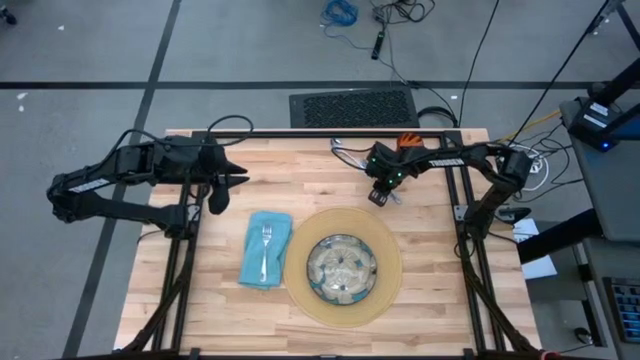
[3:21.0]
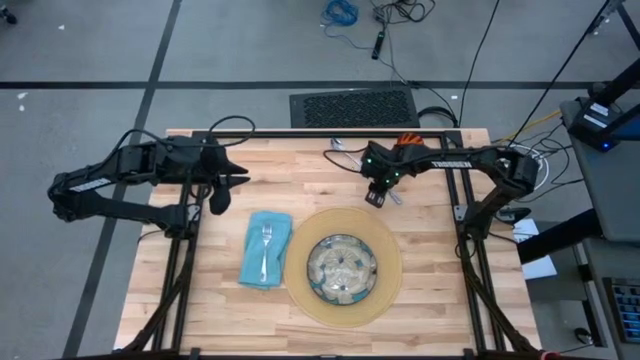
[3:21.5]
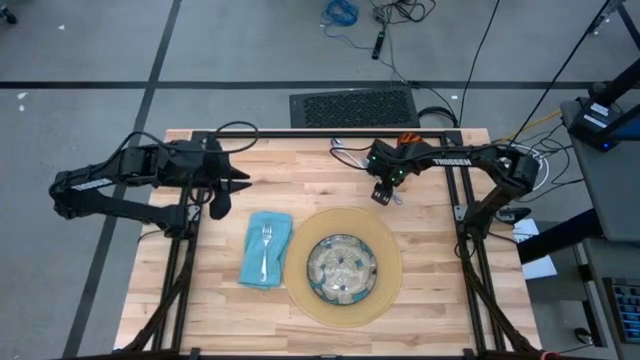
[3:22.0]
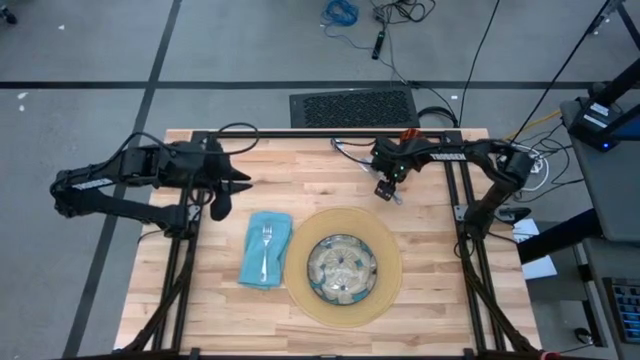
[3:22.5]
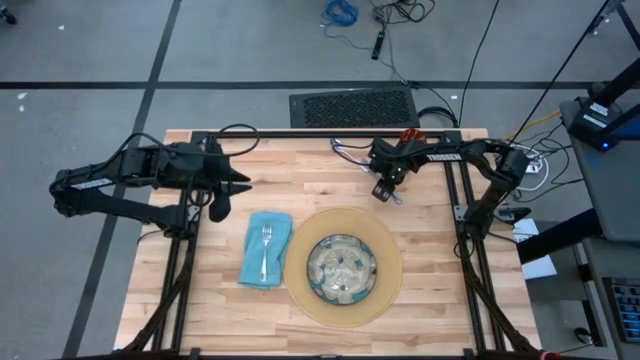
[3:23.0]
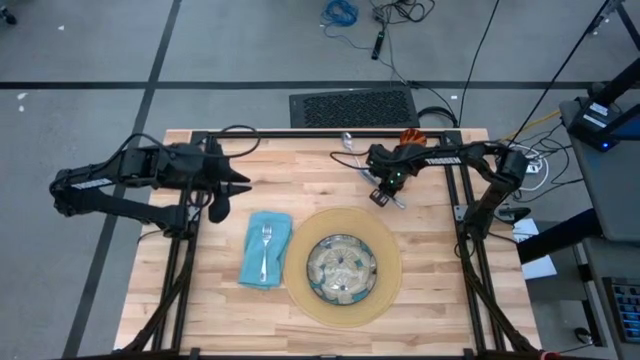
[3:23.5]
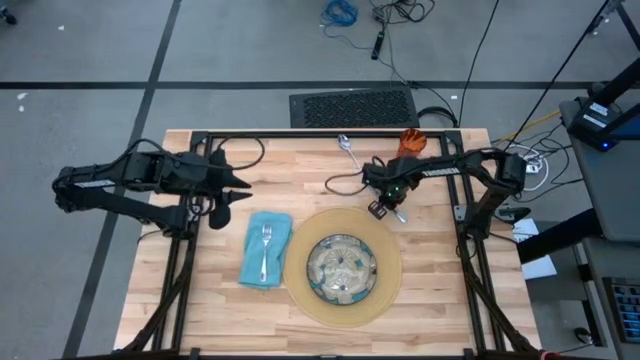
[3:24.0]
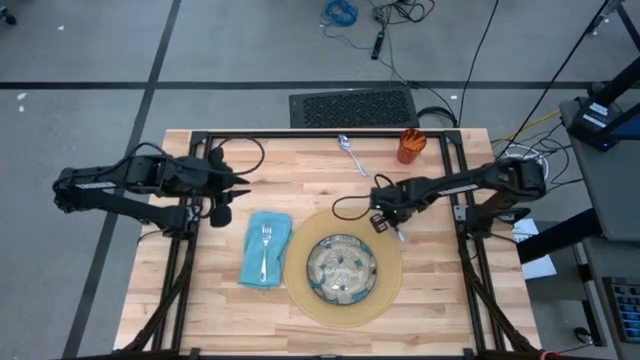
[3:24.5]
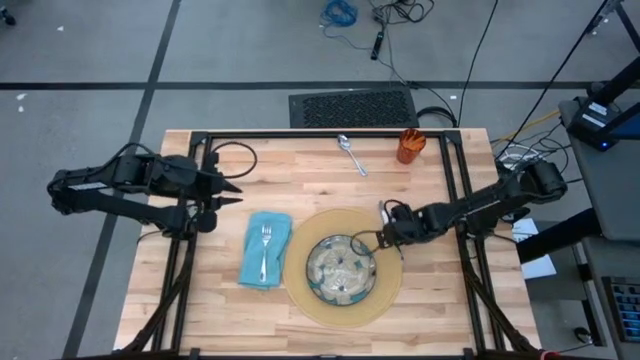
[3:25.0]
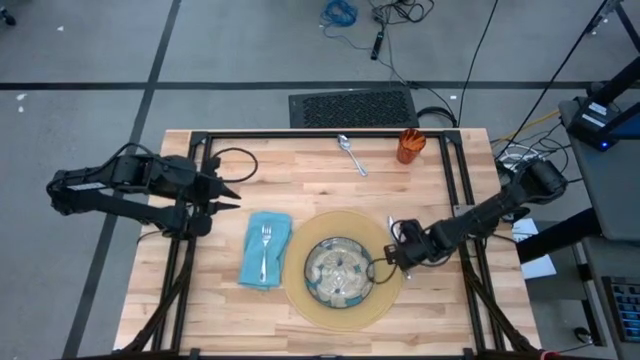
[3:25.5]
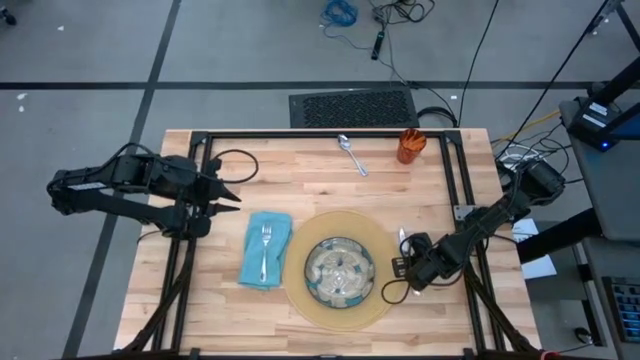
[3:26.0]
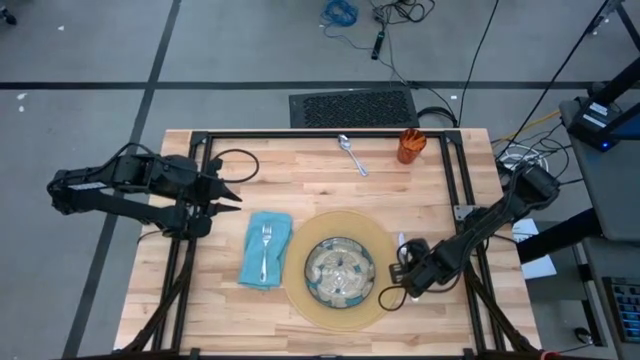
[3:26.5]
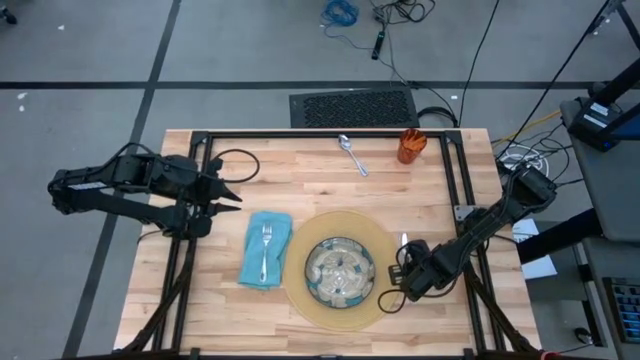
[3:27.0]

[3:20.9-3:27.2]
Task: Set table place
Put the silver knife to the right of the brown mat

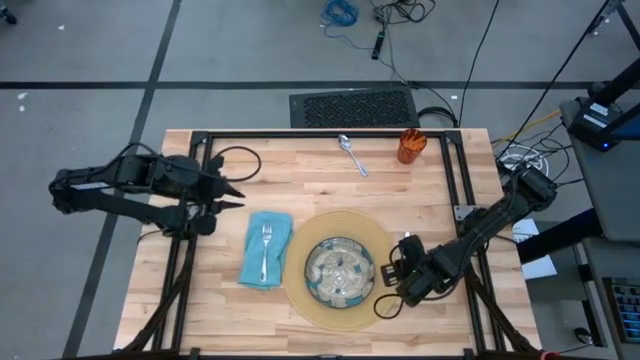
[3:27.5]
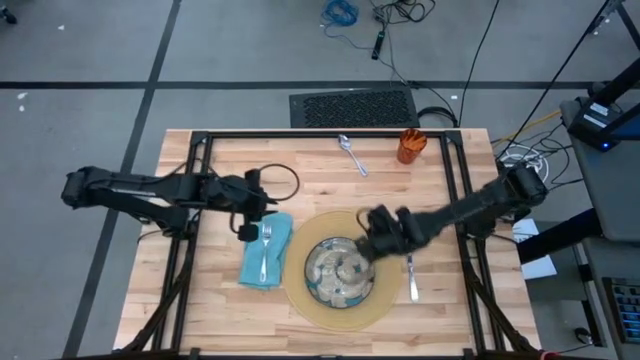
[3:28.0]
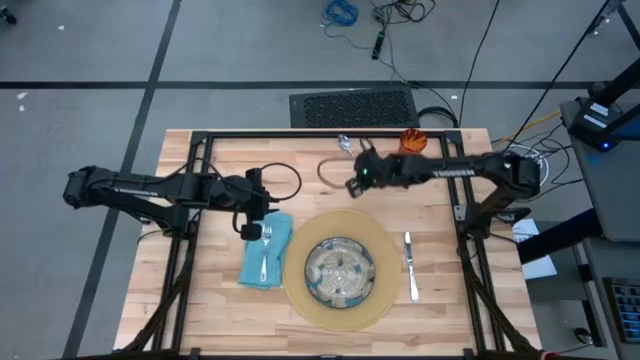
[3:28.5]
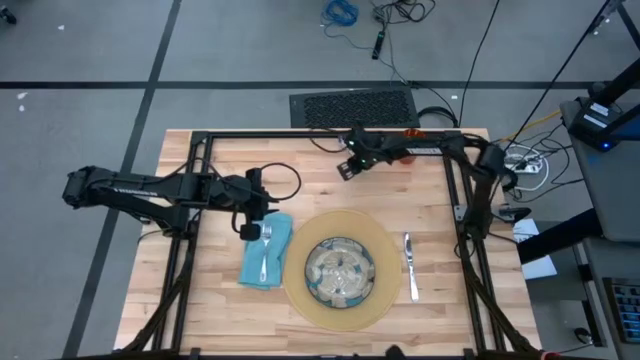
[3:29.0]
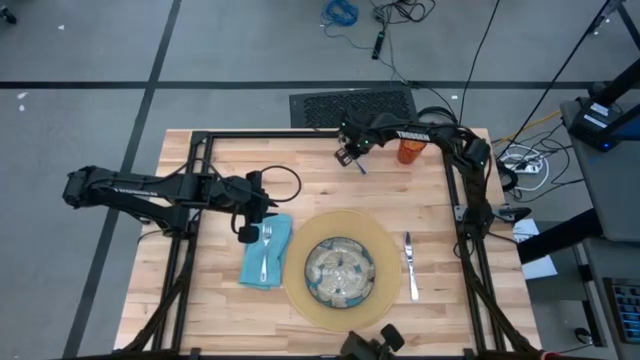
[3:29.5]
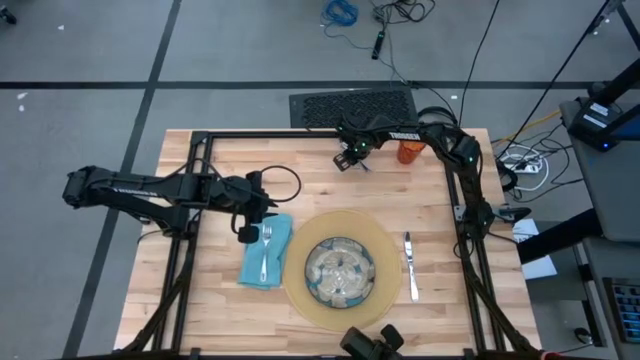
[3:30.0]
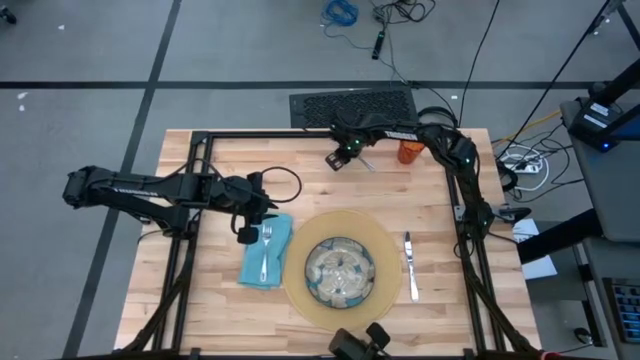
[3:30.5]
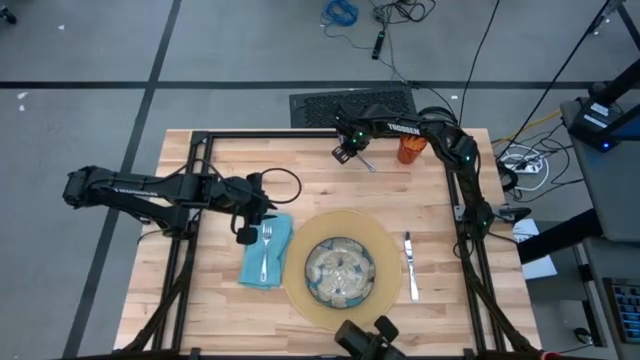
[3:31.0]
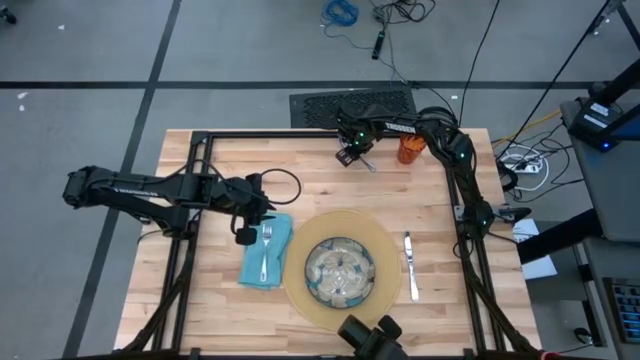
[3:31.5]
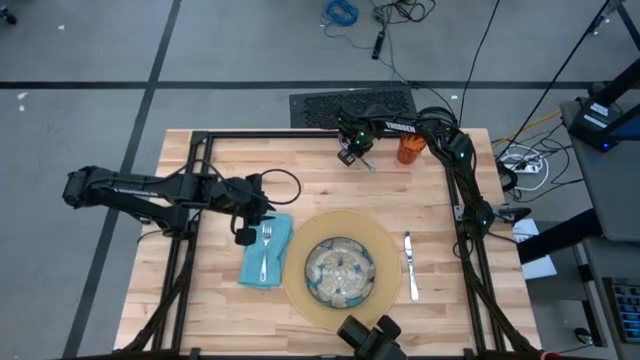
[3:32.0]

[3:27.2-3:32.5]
Put the silver spoon beside the silver knife

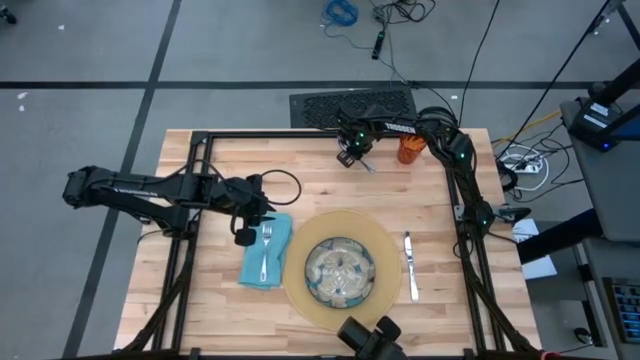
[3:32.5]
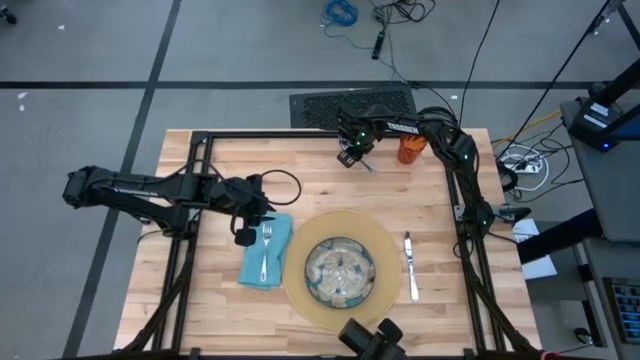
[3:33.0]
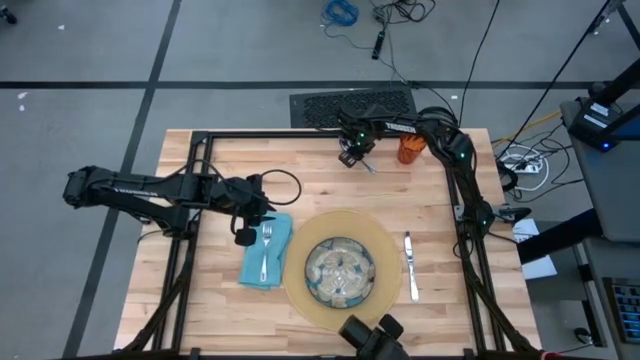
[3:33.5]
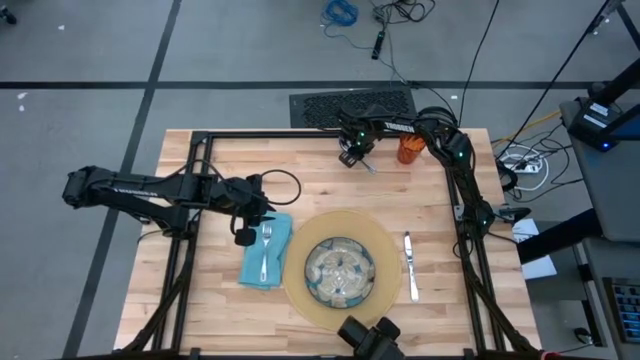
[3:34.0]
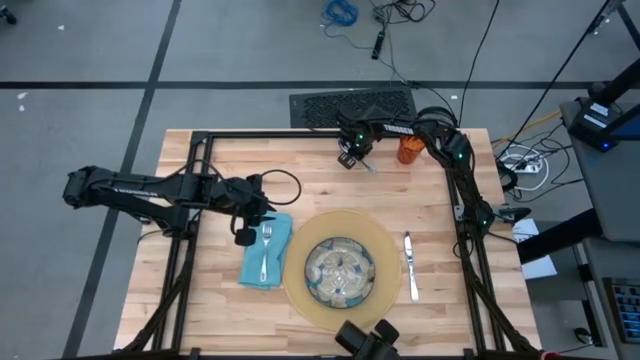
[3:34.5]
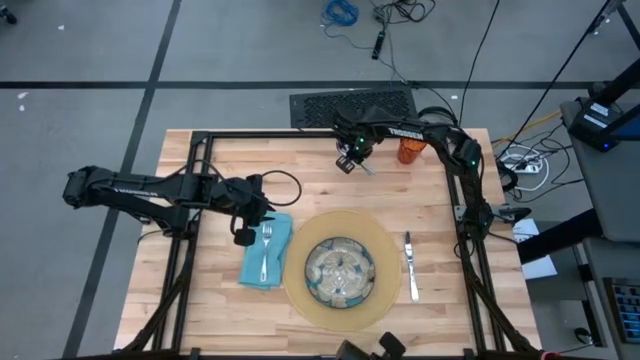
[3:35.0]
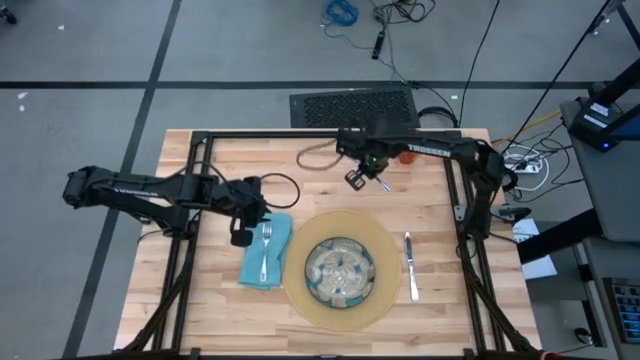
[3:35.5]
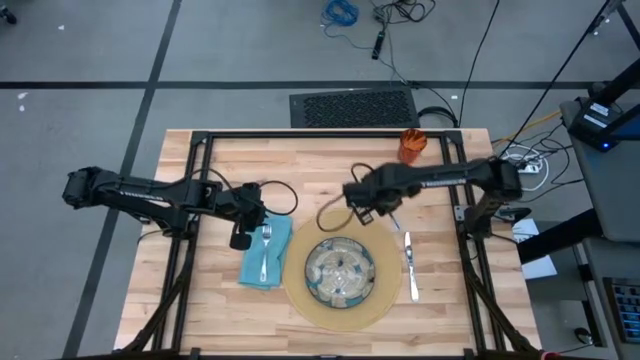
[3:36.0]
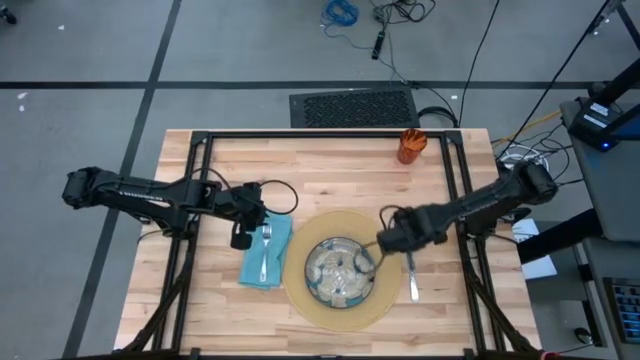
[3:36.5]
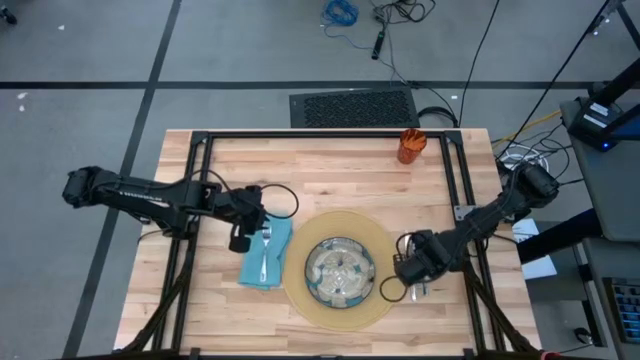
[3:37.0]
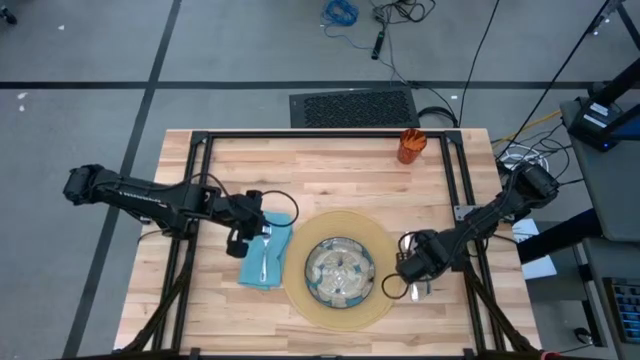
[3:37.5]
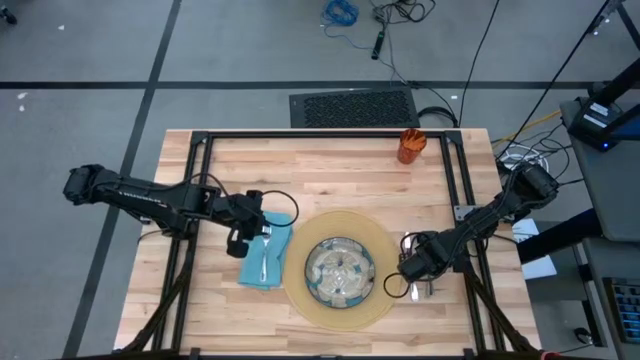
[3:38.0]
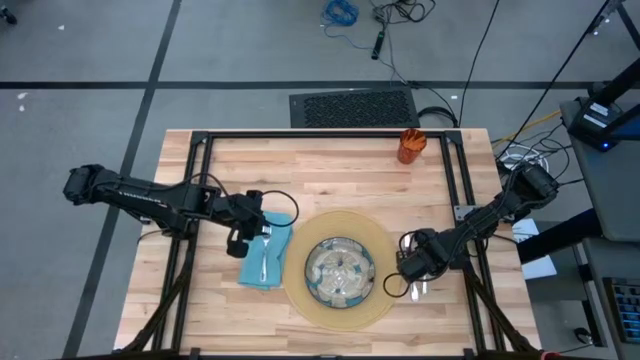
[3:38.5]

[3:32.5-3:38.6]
Put the silver spoon beside the silver knife

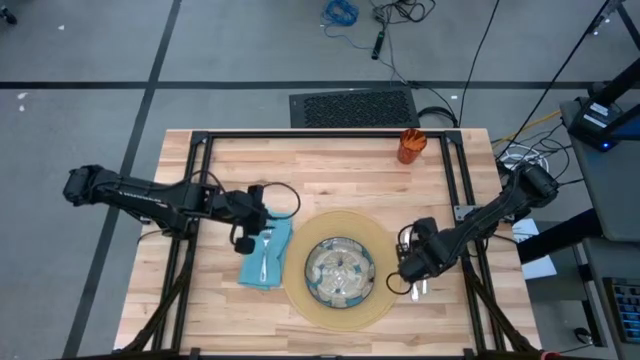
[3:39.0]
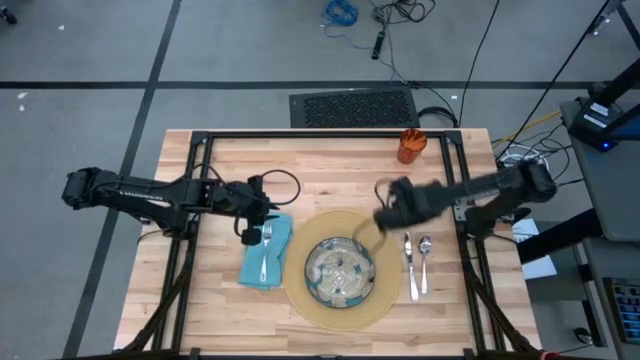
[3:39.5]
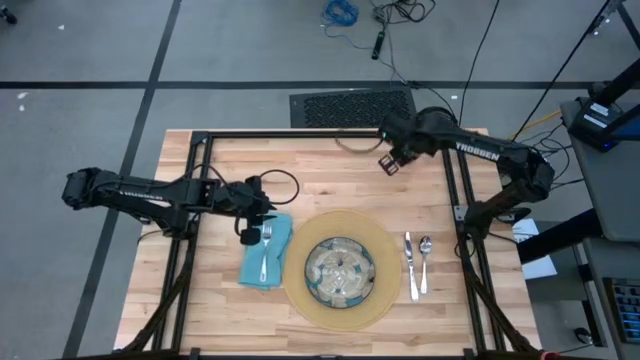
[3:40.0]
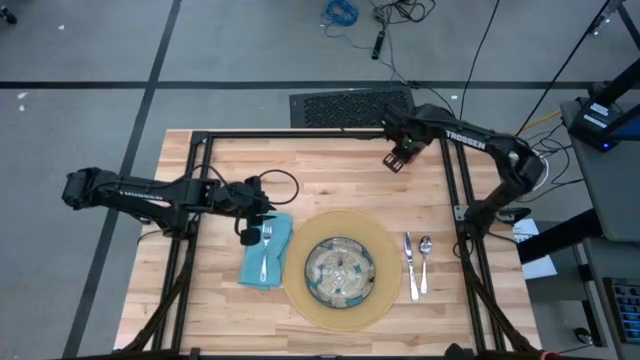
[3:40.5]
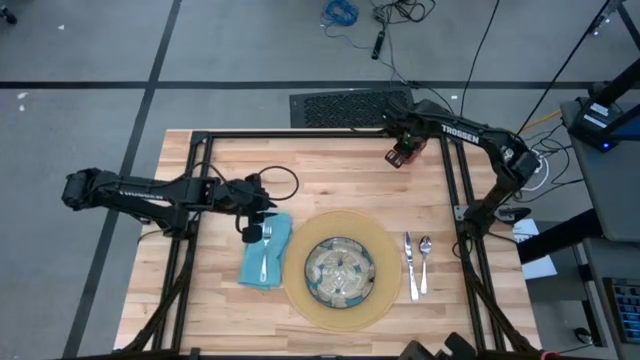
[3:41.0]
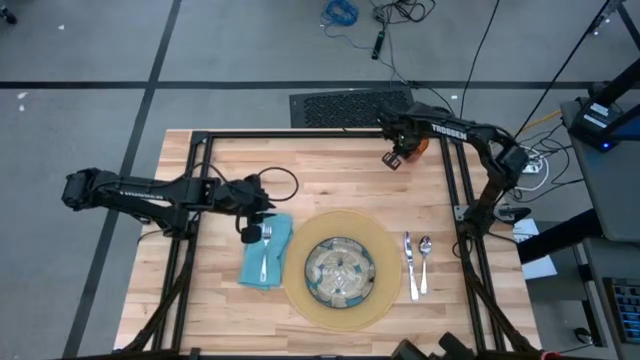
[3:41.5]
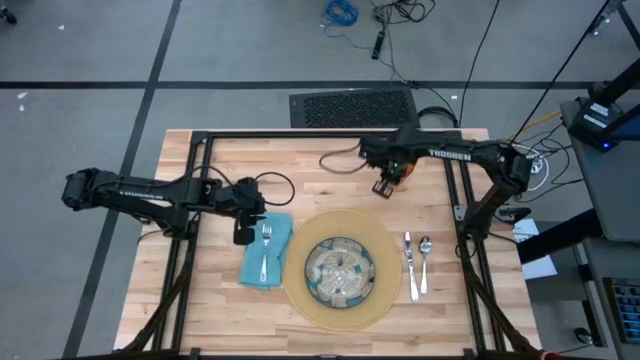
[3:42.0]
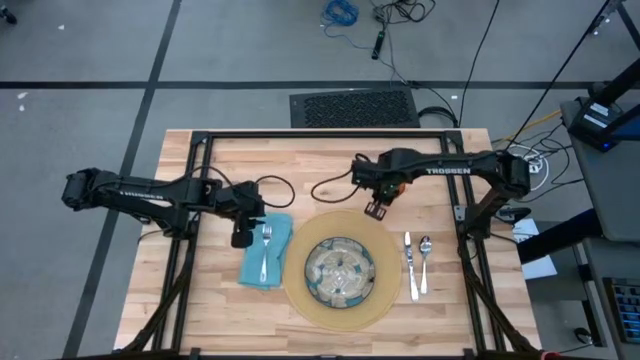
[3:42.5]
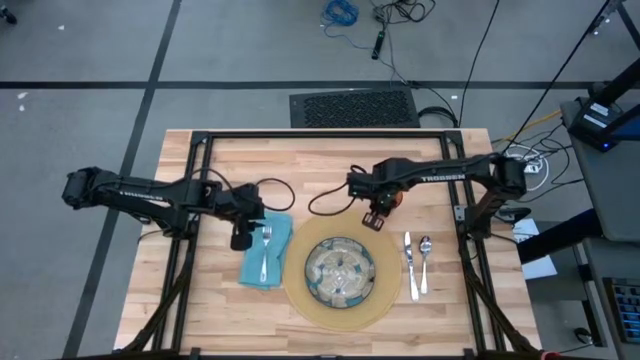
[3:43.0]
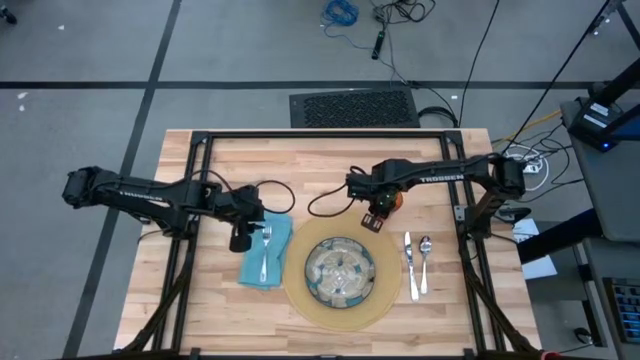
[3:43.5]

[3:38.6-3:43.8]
Put the brown cup to the top right of the brown mat
